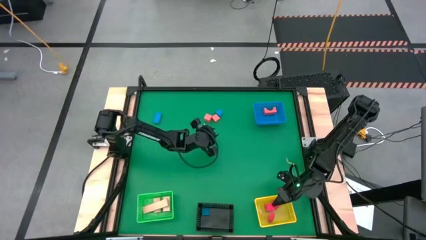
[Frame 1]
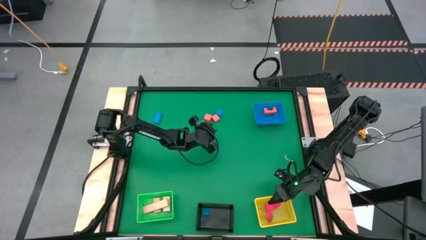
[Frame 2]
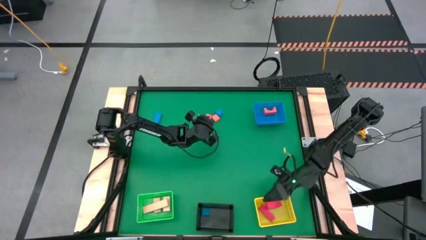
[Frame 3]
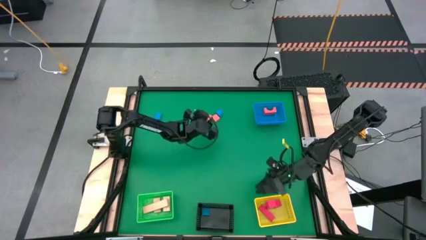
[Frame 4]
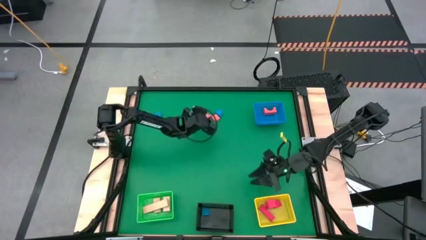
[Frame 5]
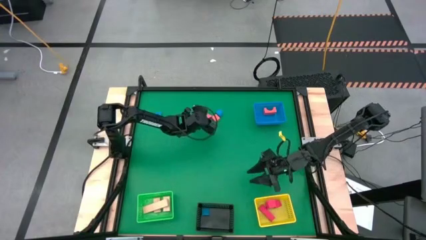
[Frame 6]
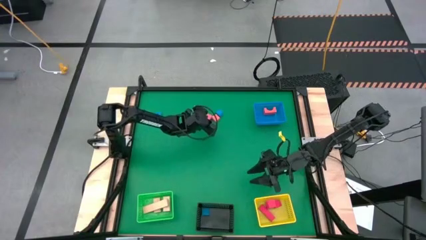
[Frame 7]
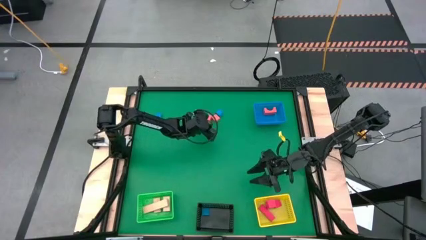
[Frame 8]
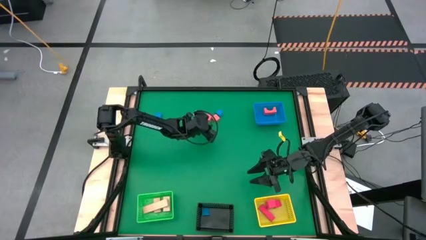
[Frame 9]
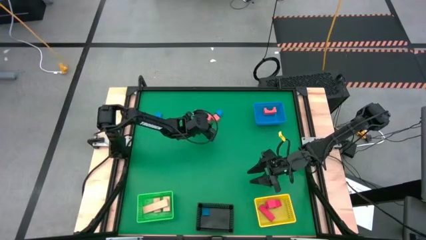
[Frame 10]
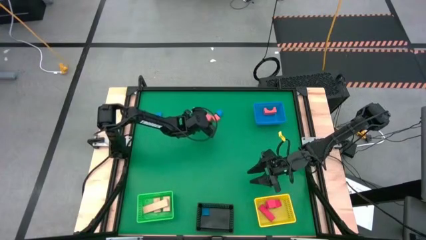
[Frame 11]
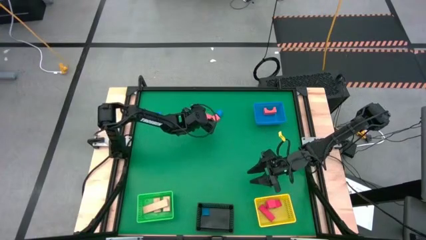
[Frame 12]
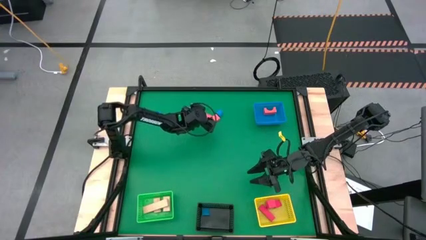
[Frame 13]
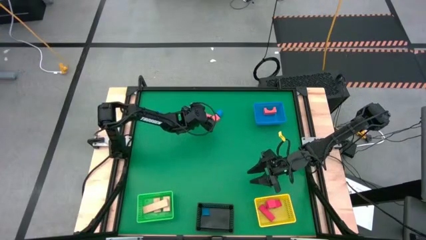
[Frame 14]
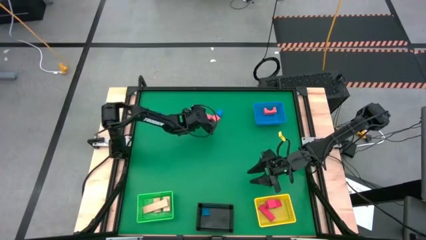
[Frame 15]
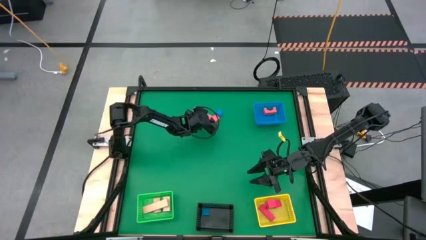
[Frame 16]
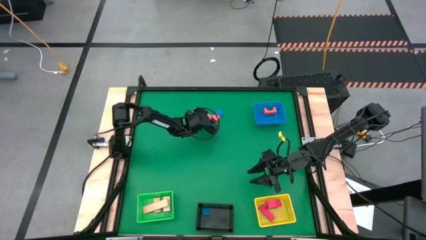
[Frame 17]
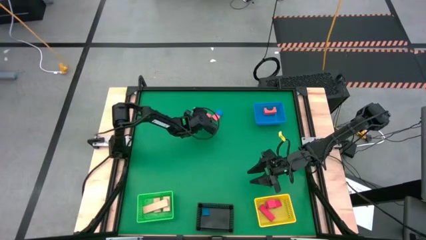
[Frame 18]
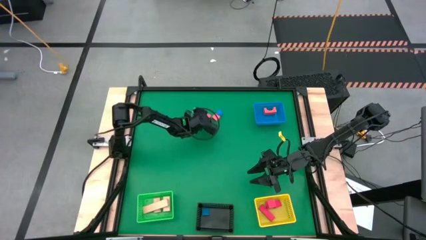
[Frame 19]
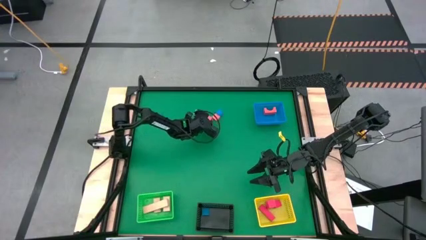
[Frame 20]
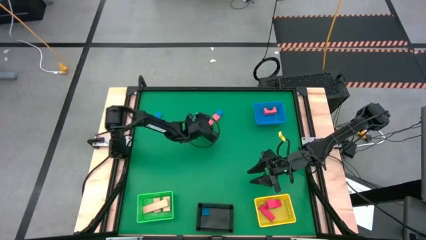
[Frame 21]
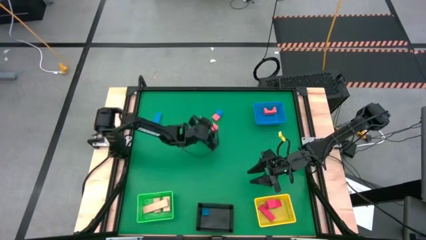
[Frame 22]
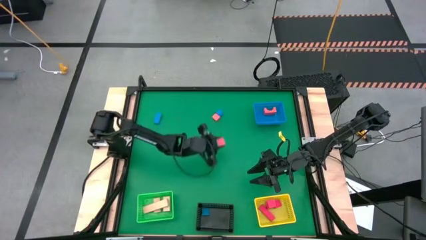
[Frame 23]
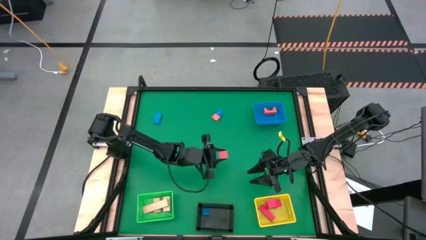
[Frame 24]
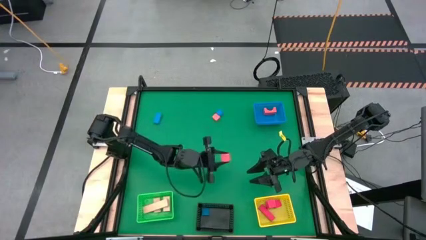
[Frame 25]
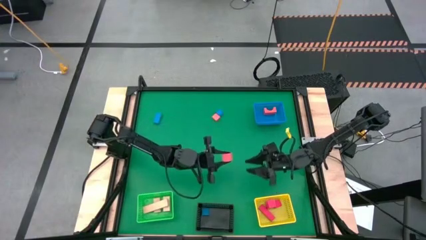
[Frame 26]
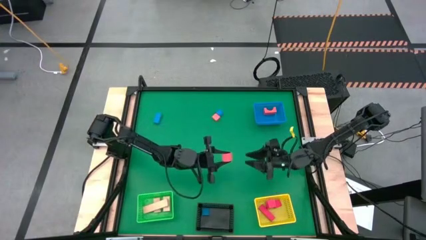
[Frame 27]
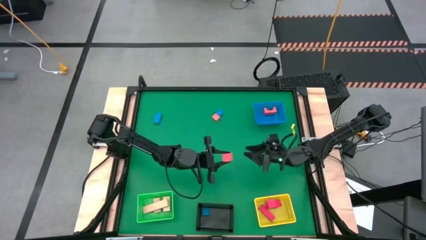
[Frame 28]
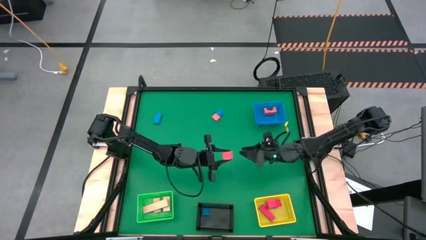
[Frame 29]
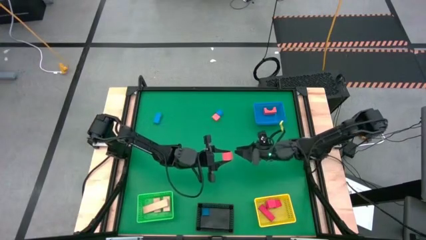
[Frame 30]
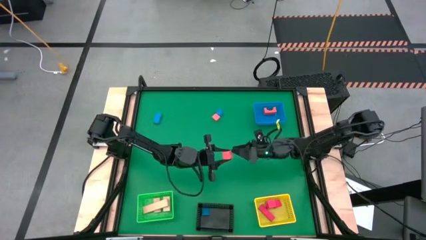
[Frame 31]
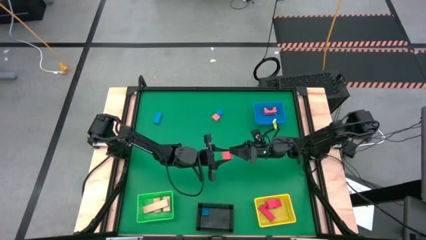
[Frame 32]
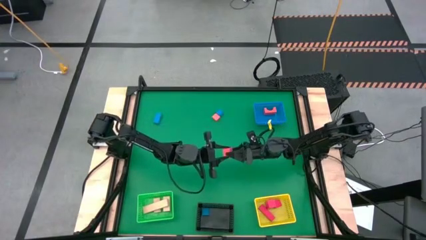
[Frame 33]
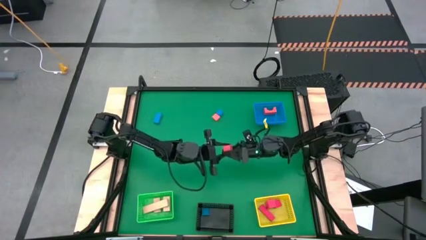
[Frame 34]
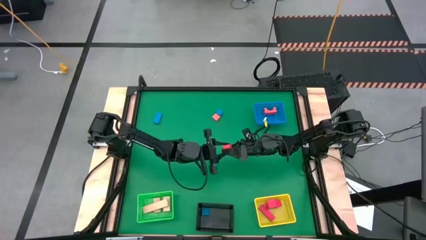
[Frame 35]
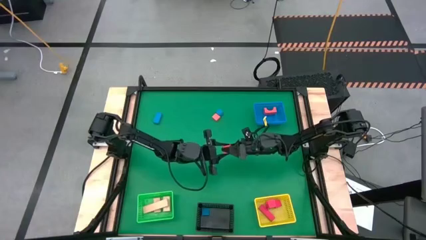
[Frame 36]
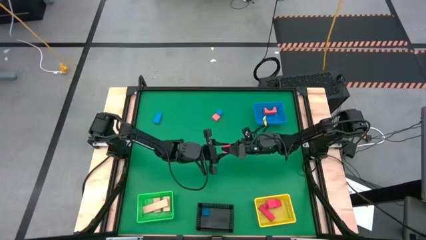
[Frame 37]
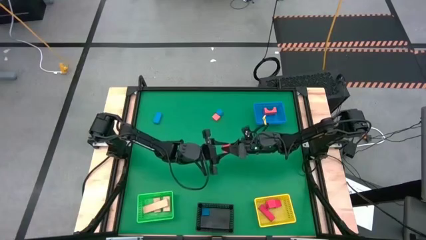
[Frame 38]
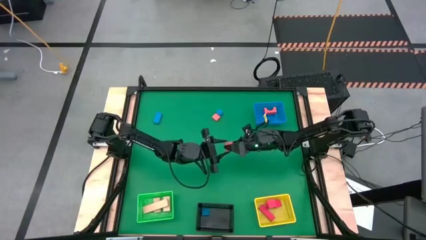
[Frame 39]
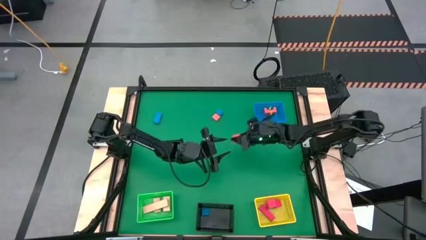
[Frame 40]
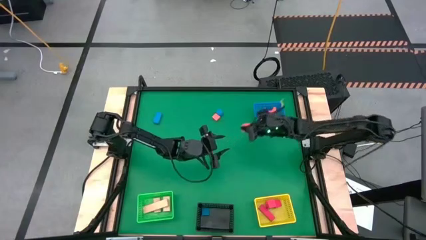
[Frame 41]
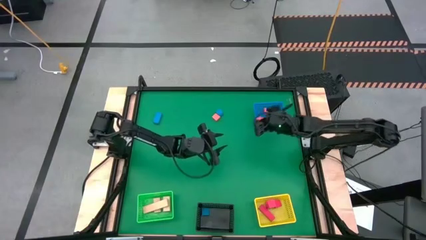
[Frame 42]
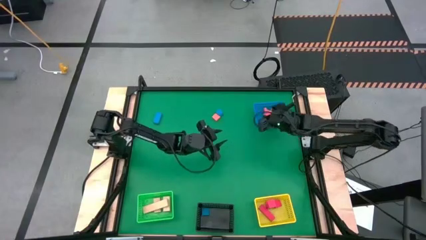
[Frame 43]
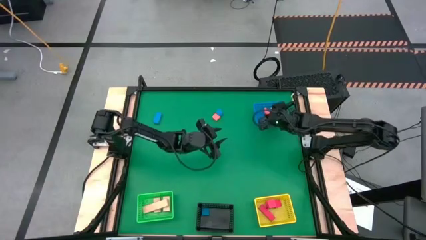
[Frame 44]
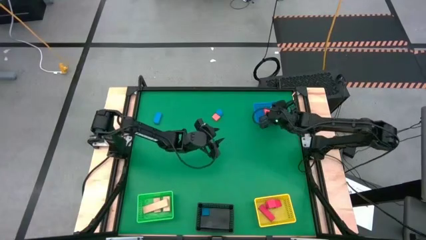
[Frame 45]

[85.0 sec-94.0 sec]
Task: Sort & place blocks by color
Put the orange block into the blue bin

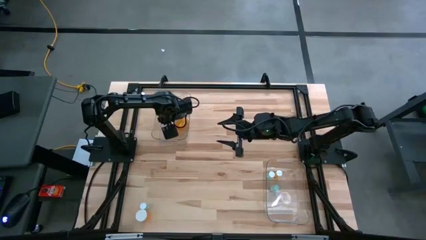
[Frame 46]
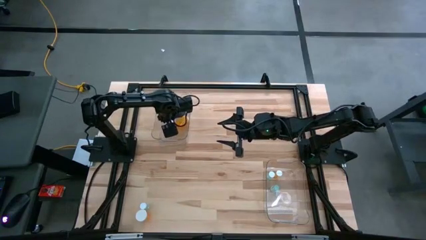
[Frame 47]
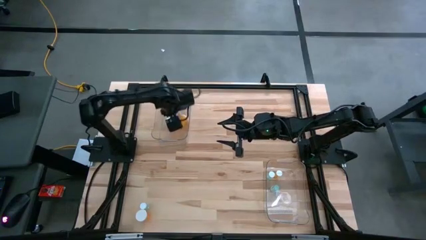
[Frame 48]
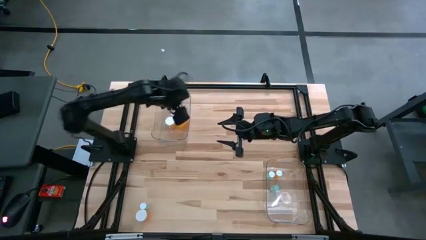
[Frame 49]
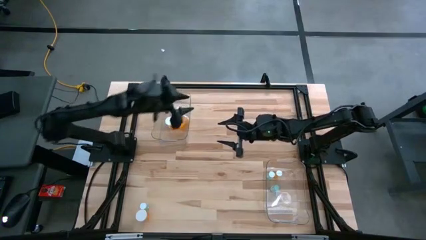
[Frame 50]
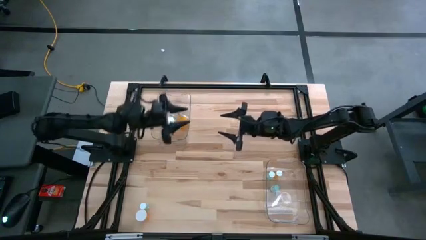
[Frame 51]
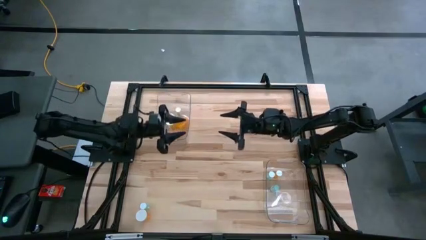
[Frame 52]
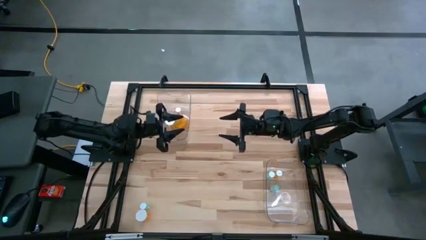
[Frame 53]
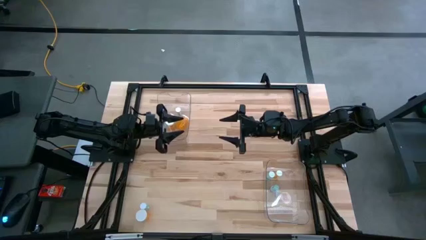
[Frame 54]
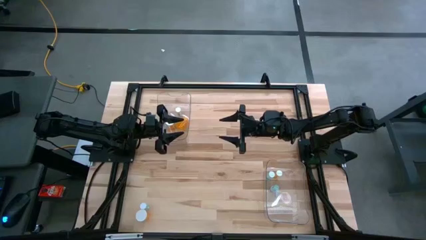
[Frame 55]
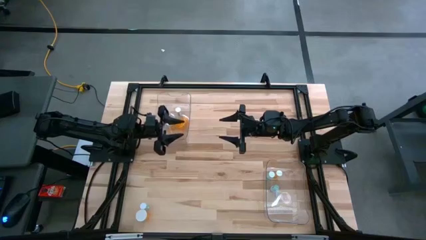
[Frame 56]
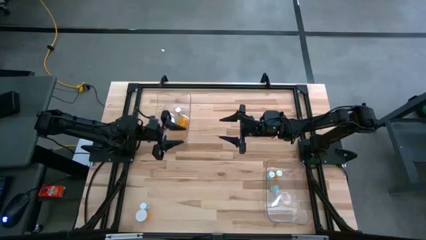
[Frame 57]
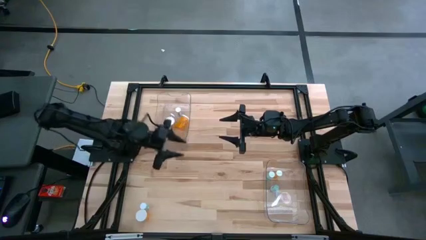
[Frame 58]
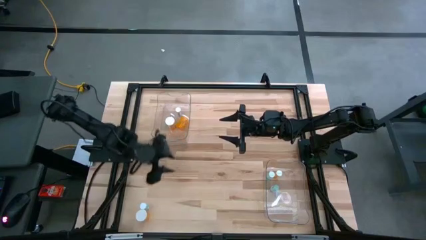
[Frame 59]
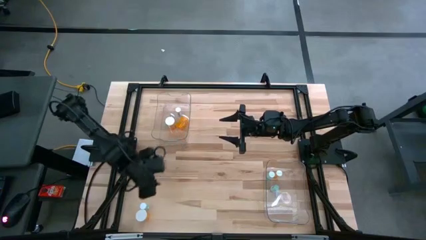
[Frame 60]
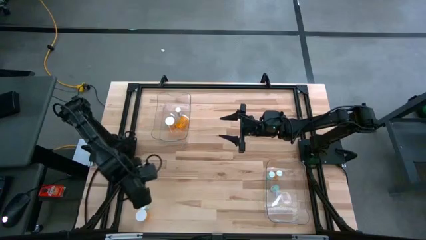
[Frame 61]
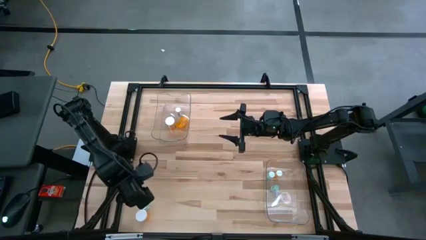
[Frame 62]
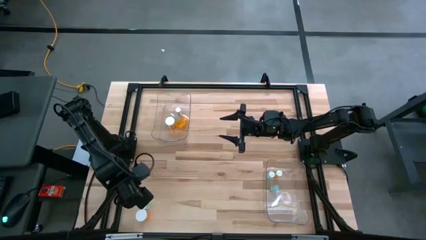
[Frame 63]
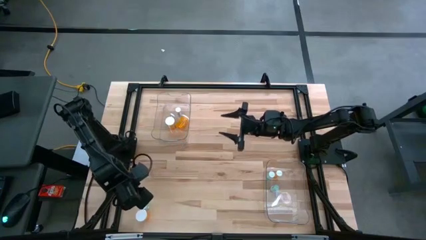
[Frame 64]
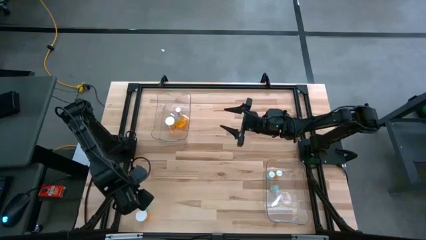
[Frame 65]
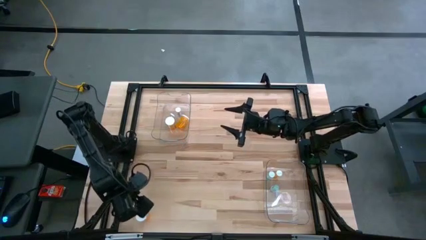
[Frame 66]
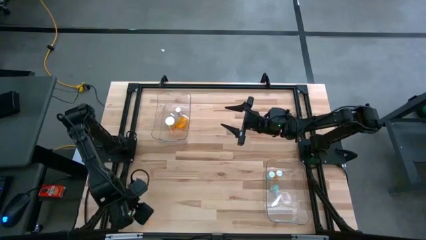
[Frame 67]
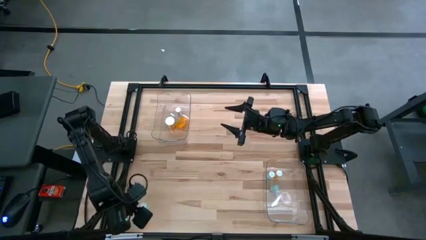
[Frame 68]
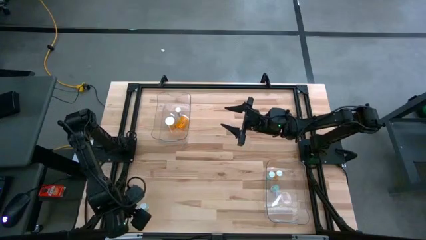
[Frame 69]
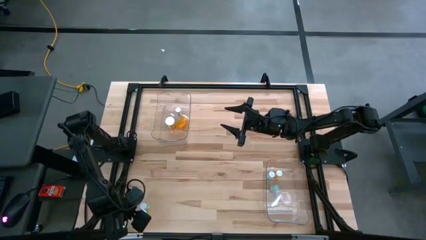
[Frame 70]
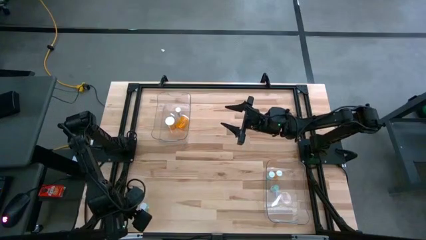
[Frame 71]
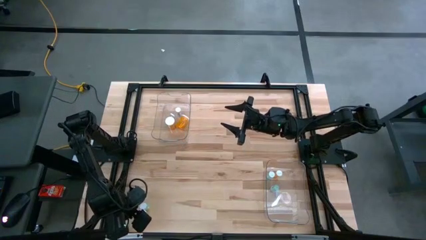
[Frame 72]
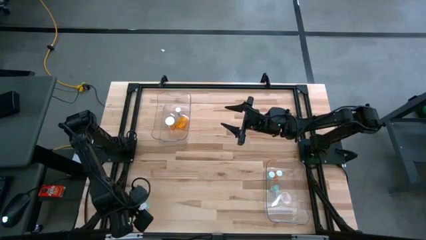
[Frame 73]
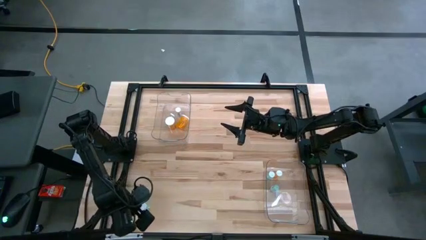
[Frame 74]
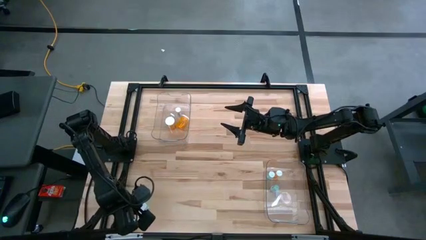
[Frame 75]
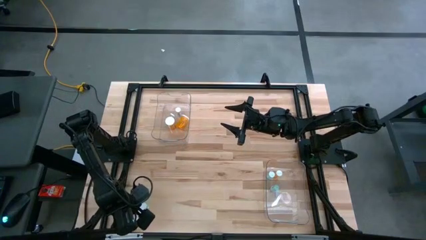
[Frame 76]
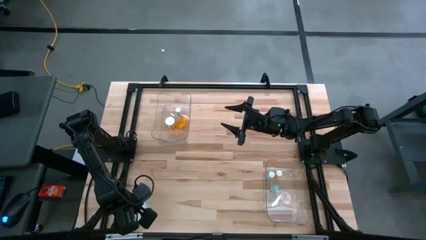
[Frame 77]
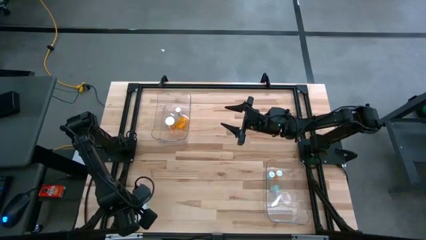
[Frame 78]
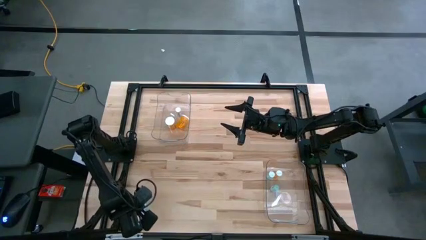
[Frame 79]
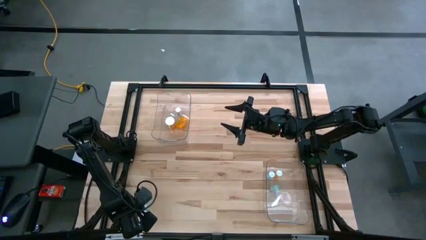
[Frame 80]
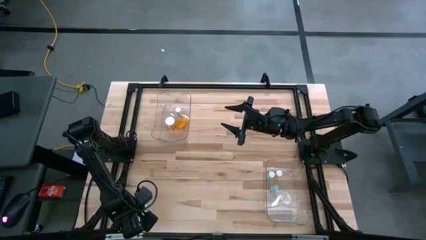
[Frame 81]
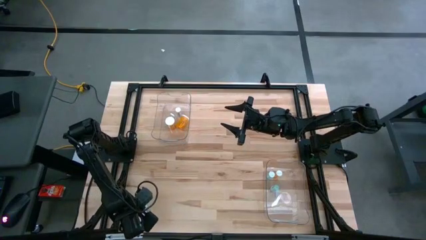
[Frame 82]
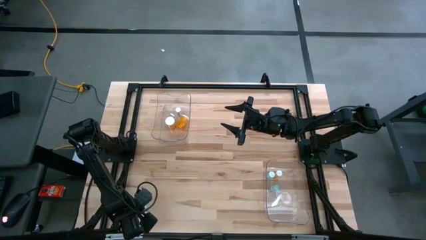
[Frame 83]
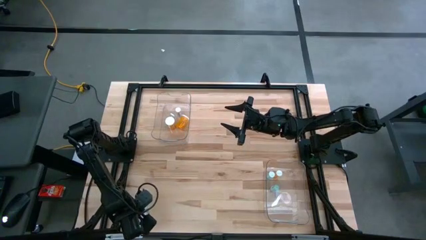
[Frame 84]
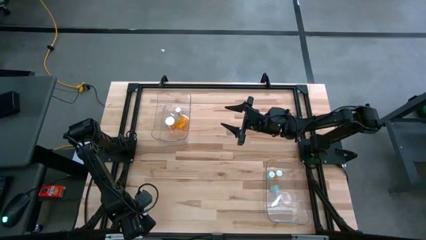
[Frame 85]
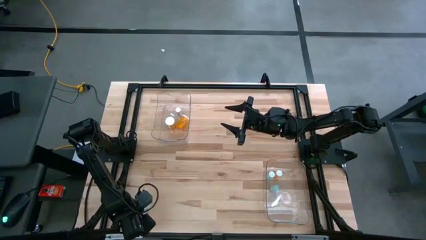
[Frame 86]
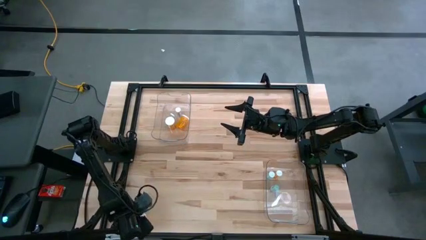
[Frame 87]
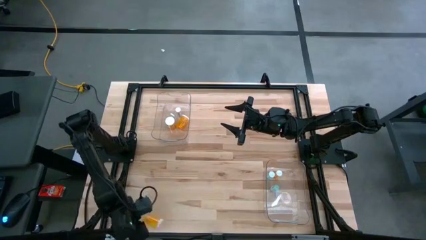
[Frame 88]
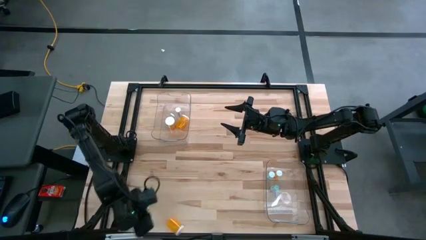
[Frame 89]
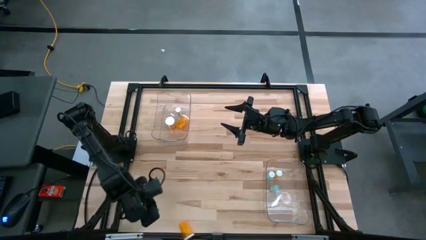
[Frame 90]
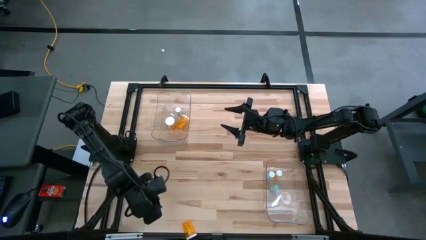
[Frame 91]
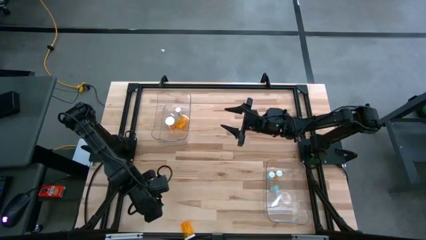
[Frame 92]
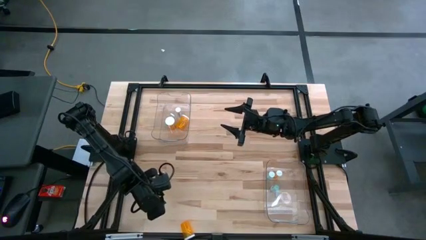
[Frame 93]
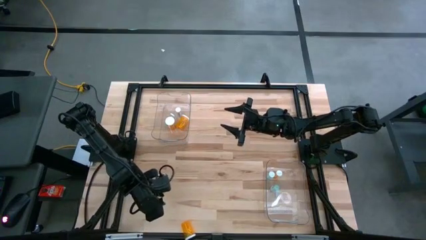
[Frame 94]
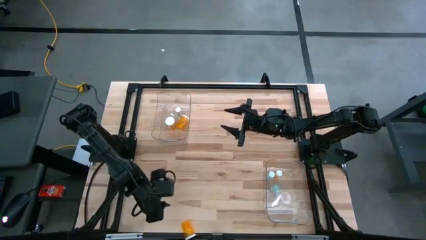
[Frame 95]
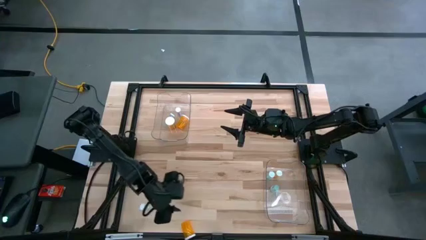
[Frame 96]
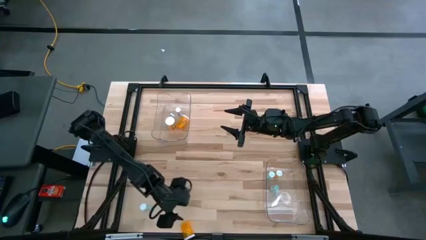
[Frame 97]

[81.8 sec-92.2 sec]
Task: Pick and place medicine bottles into bin by pill shape (circle, oval)
Put the orange capsule bottle into the left transparent bin
